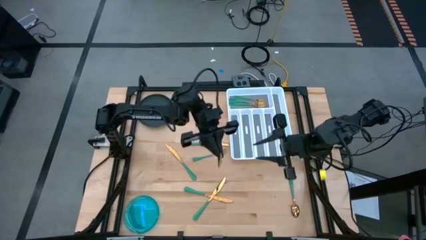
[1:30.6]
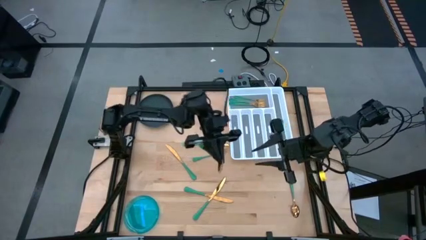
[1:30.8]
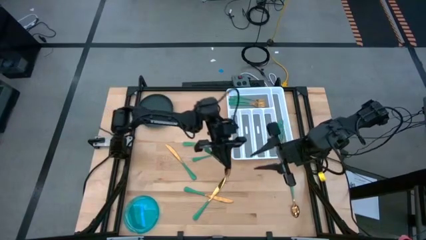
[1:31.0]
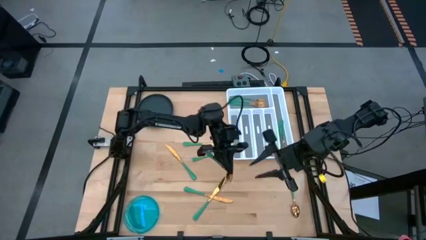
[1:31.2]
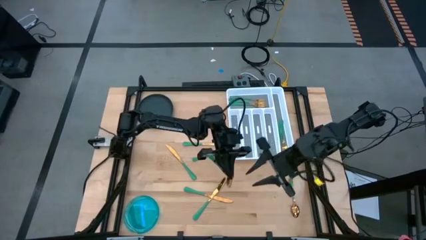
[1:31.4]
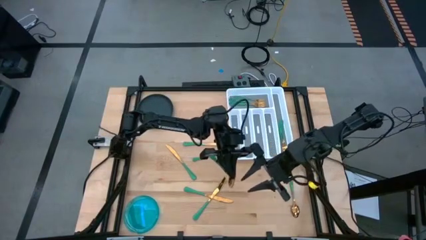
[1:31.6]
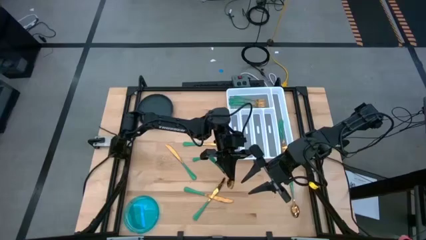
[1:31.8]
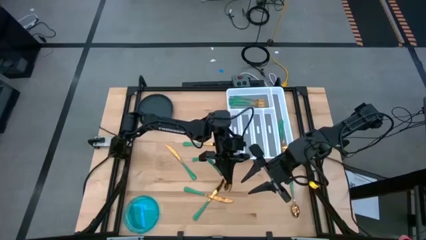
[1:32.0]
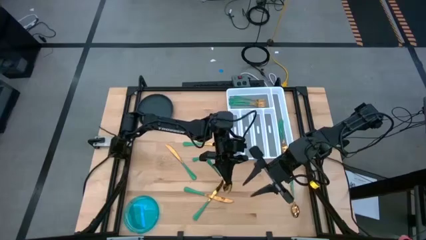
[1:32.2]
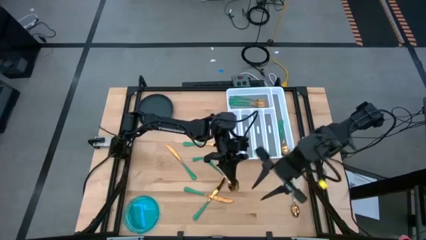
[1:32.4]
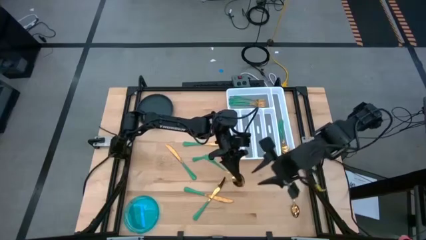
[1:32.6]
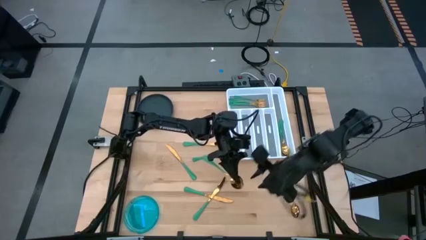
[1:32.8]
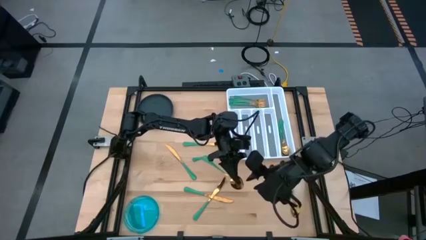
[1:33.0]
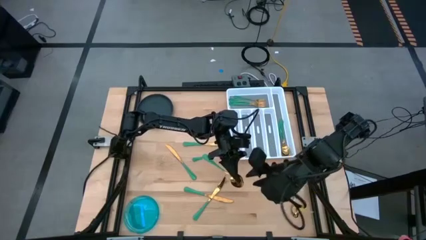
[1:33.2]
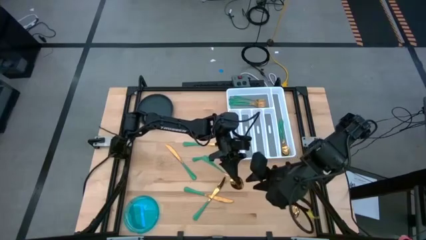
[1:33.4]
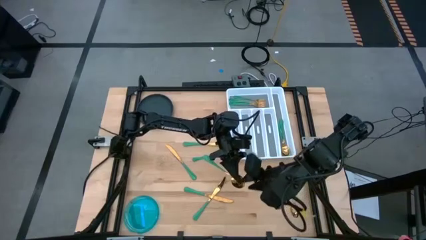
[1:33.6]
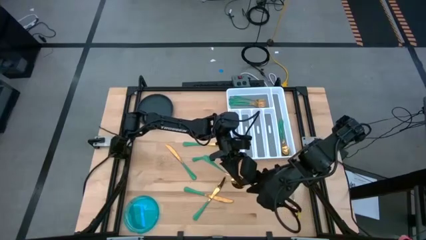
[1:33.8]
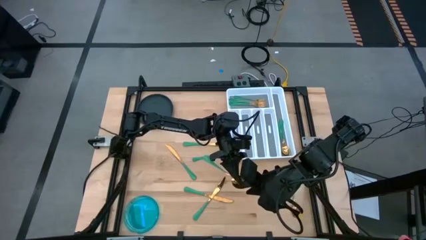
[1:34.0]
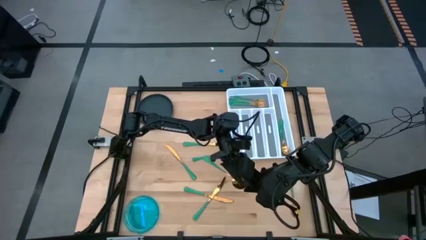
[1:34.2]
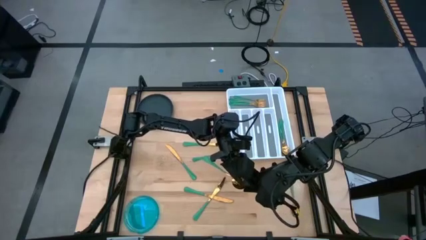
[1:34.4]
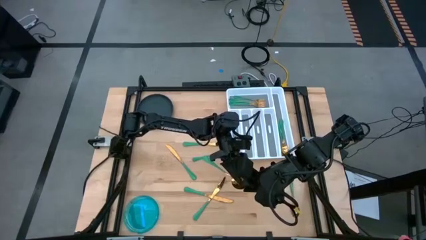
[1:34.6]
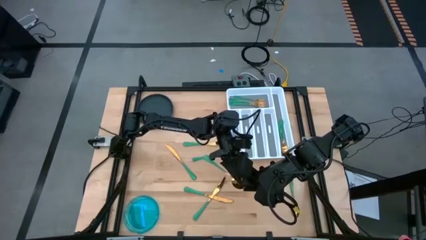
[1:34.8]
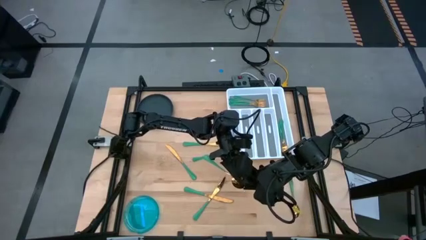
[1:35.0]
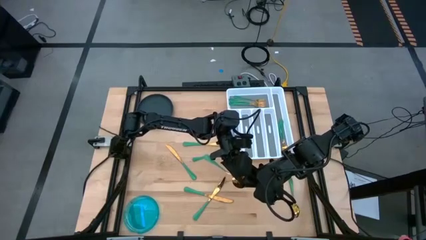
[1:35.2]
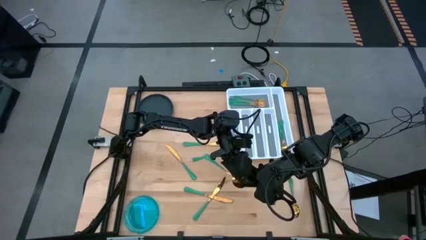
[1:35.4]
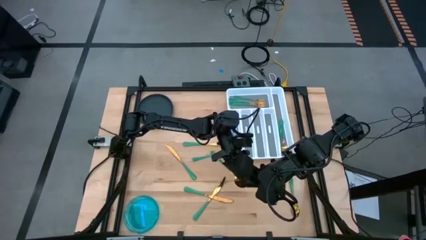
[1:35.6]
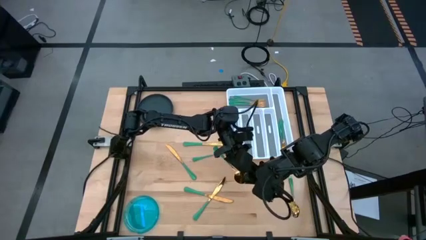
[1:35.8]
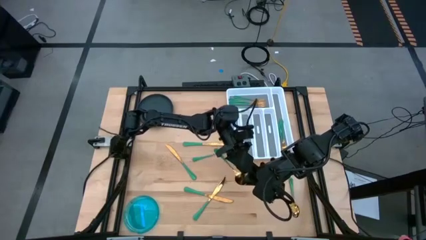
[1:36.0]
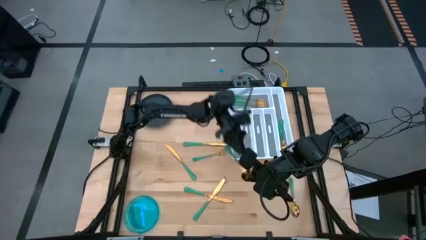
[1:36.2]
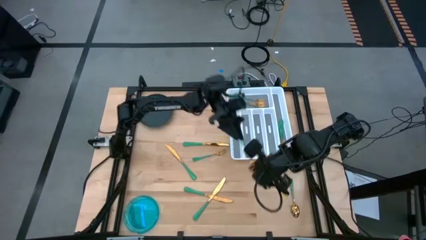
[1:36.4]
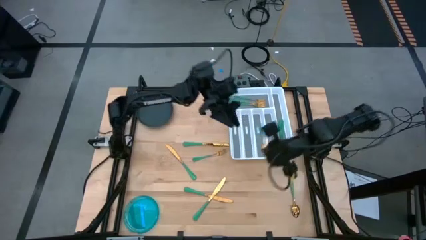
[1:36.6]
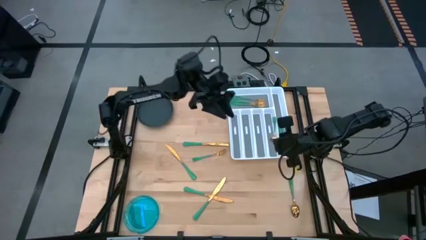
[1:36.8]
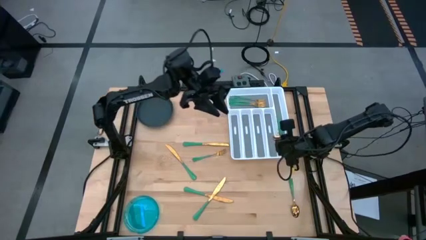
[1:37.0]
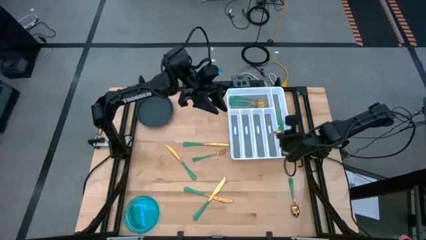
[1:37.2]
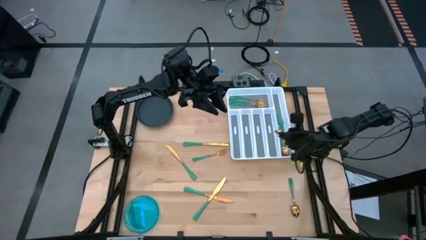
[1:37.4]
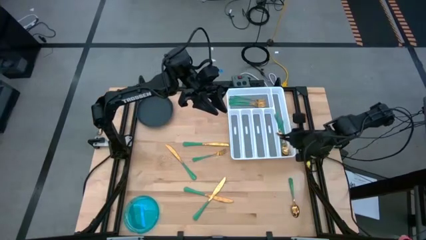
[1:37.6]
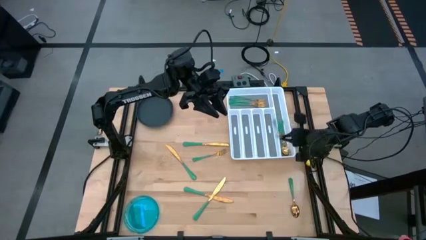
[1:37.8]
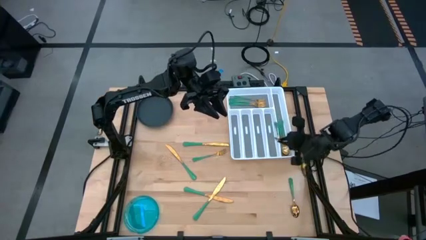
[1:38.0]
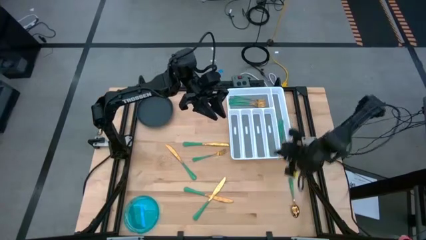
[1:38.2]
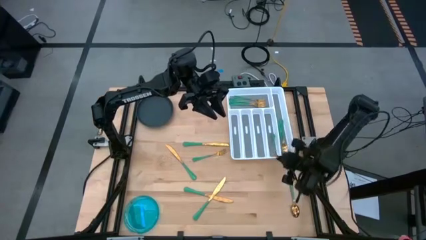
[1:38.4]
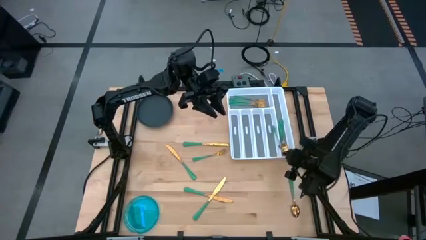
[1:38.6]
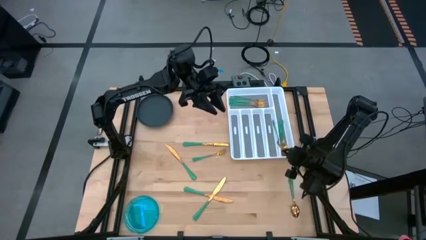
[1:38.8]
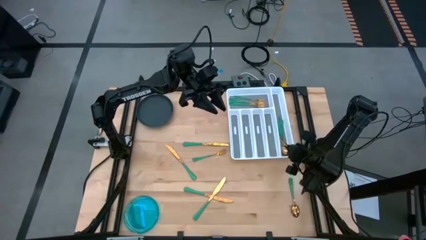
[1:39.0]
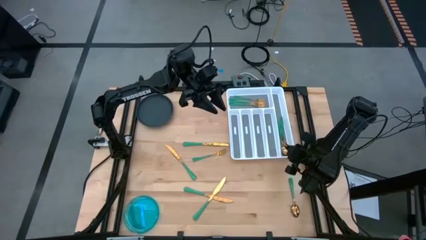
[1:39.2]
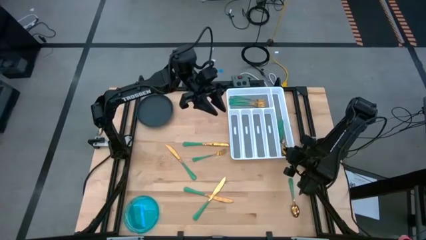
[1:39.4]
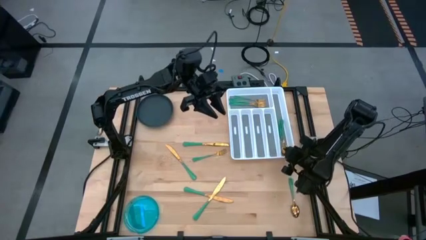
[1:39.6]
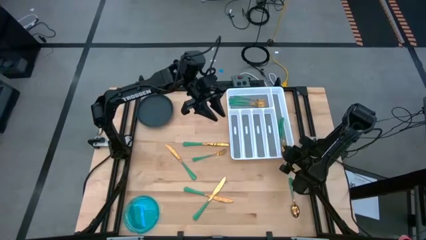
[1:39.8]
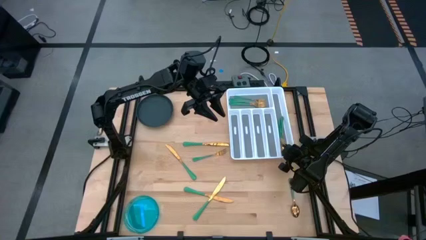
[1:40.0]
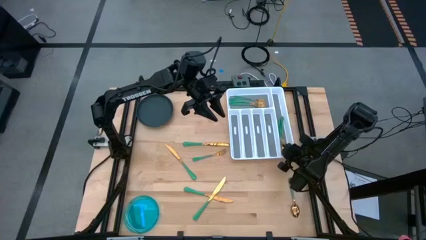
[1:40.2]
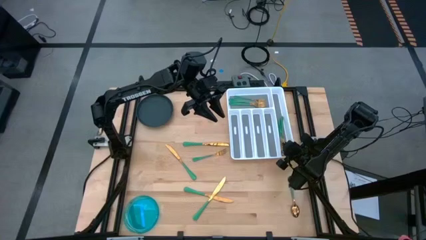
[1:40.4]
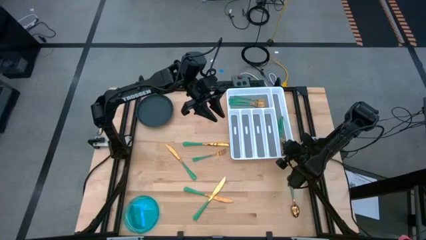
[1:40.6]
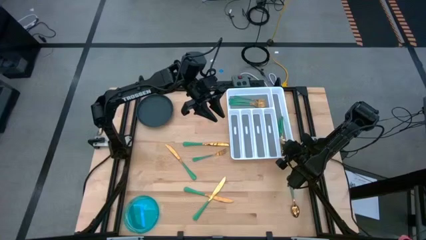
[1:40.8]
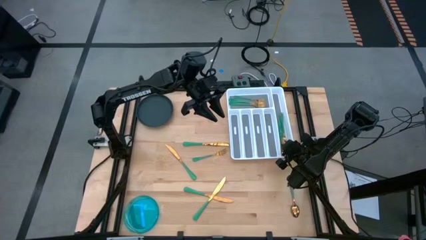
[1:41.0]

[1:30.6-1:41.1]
Task: Sort silverware
Put the green spoon into the silverware tray

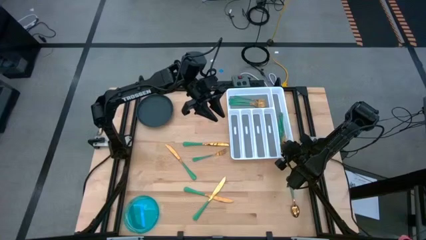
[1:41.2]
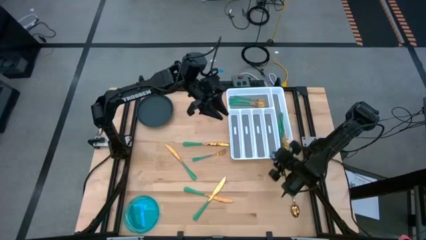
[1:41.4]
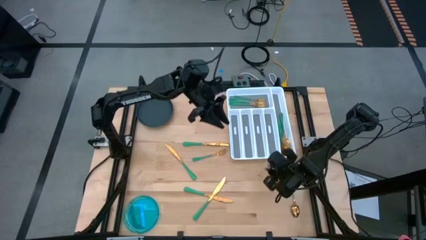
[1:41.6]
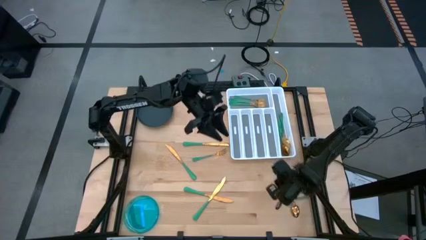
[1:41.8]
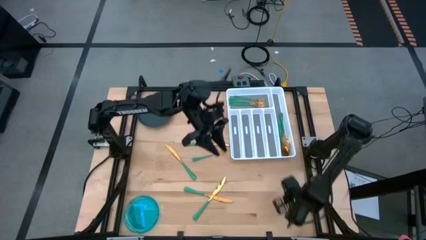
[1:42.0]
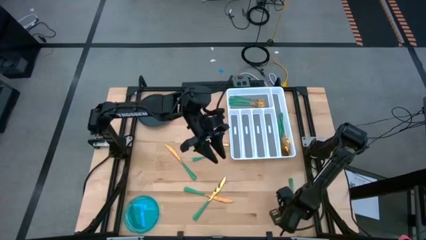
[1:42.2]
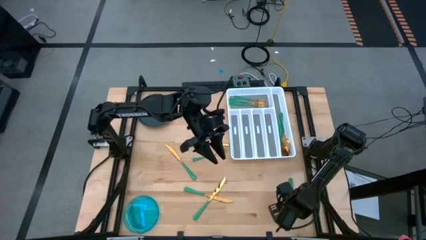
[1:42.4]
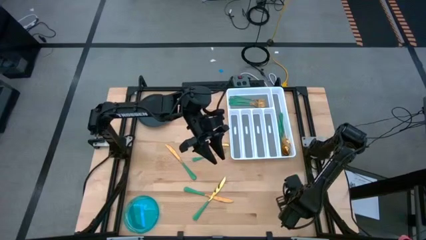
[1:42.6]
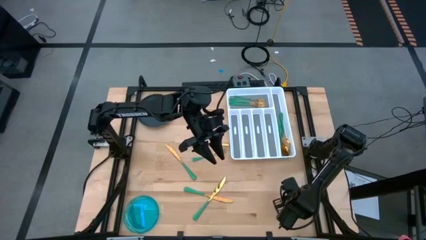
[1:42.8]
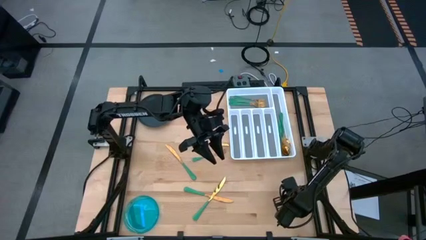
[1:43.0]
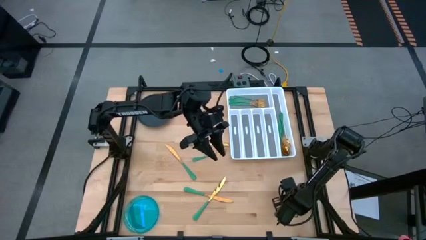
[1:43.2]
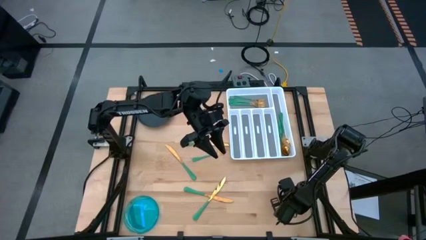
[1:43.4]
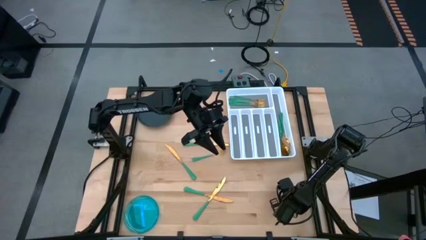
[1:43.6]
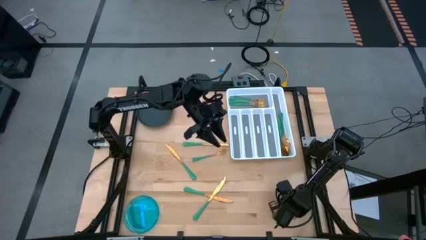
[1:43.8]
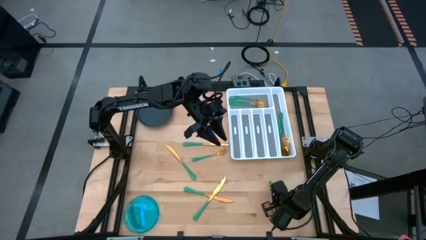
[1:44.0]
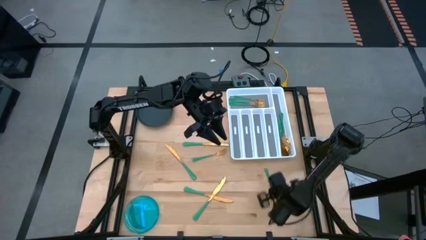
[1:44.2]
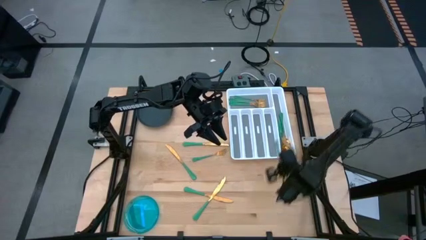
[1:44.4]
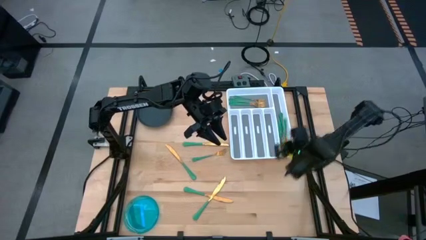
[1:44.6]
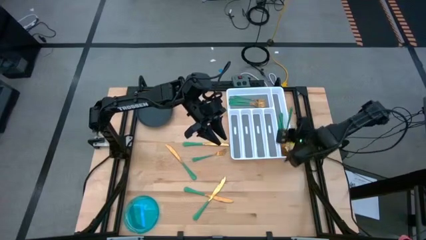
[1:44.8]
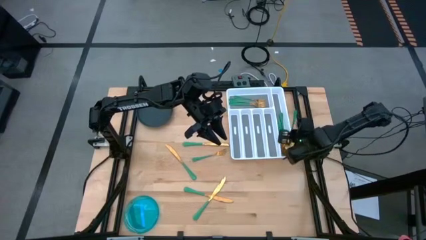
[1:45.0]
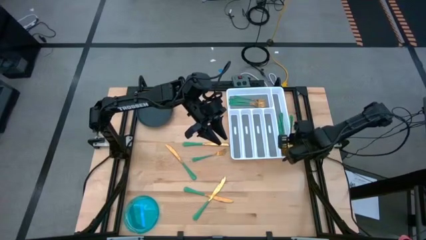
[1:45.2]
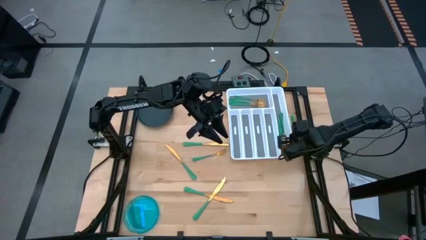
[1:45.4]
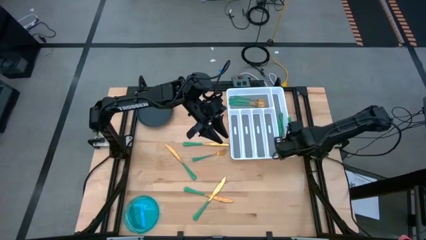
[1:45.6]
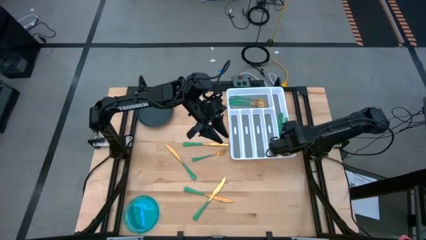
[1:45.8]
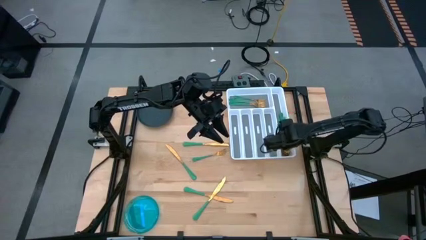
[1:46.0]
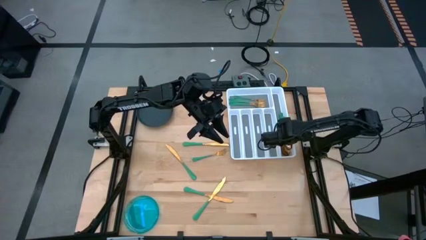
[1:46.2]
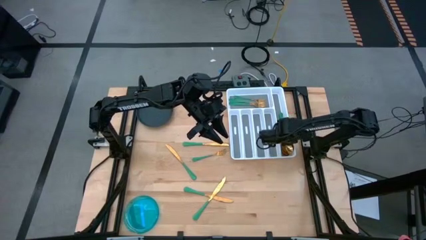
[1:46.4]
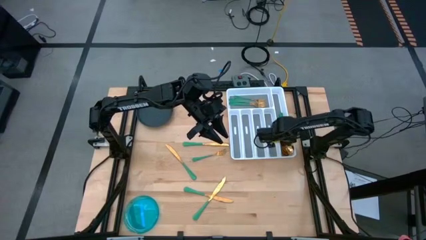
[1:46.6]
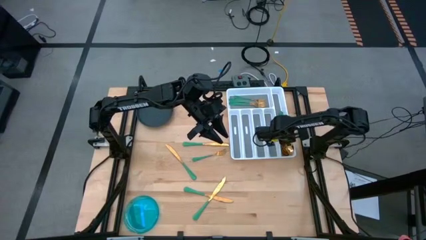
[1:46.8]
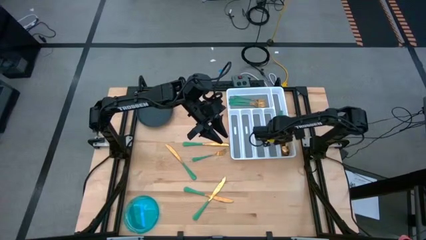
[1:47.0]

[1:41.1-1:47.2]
Put the green spoon on the silverware tray
